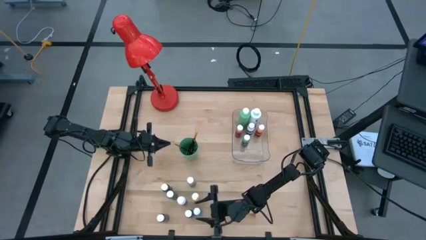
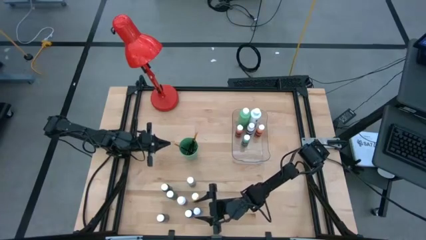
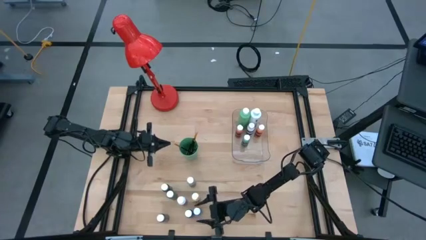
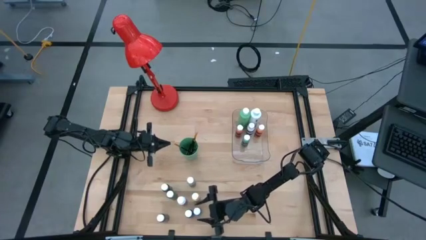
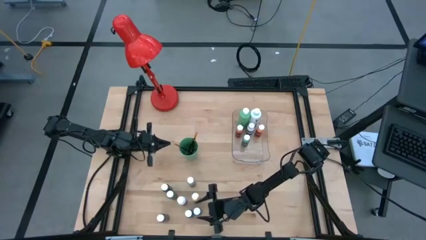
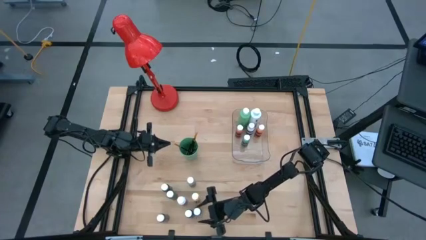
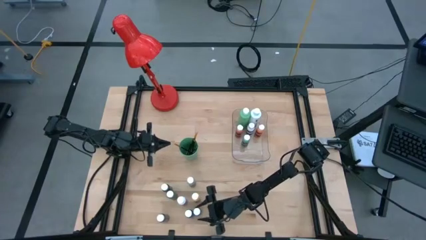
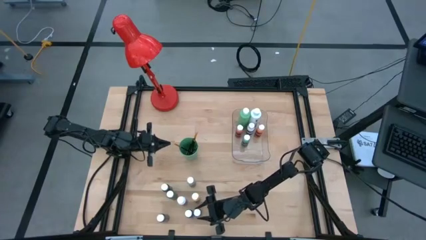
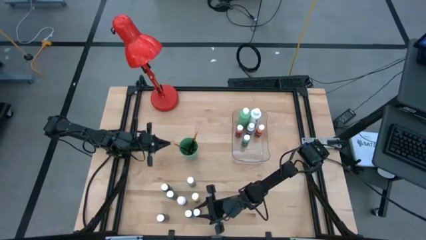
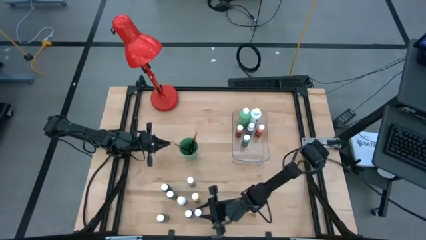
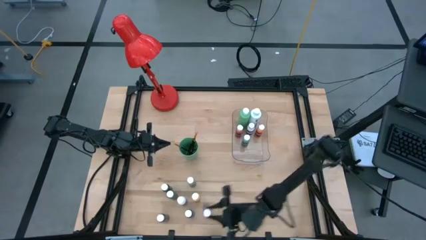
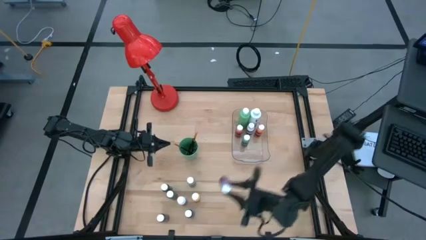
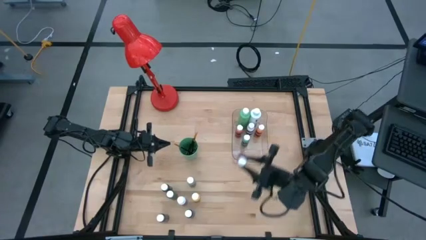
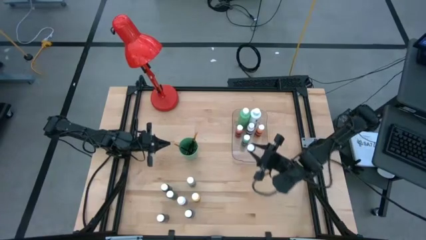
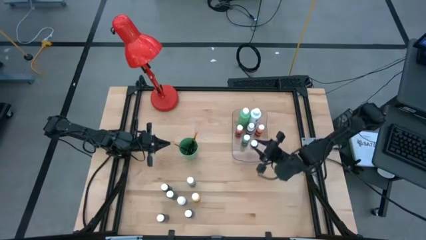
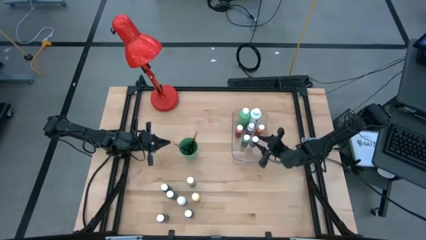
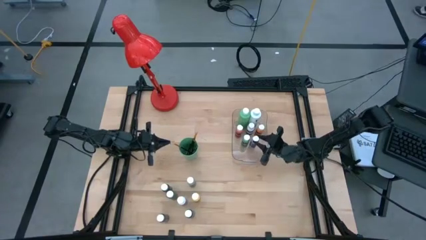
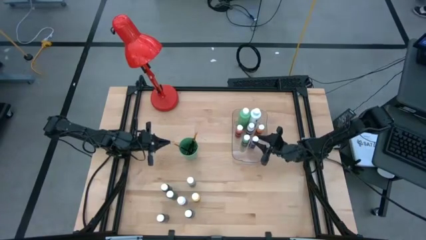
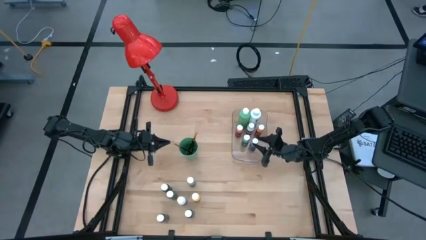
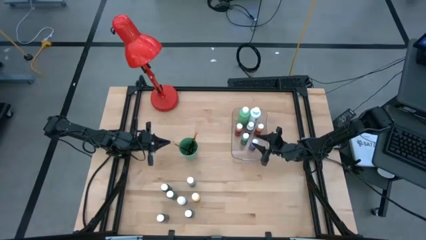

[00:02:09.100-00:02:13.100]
Task: Pick & Place Paint Supplies
Put the small purple paint bottle into the transparent bin

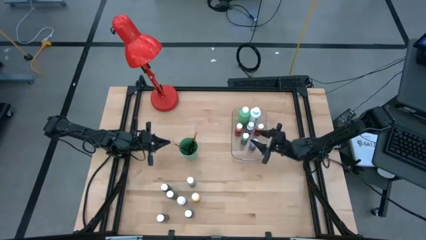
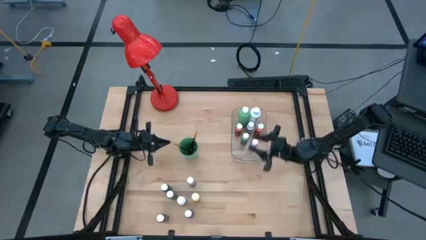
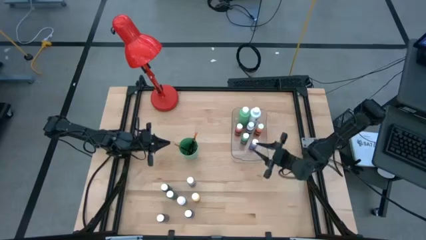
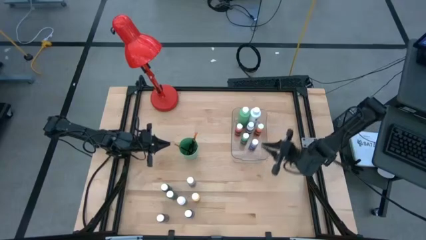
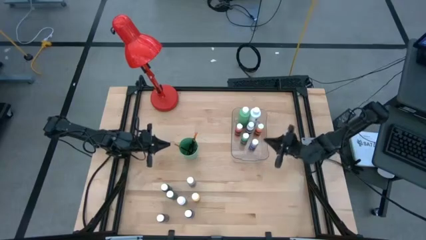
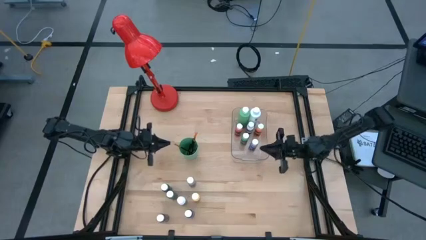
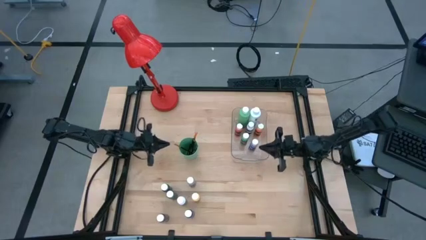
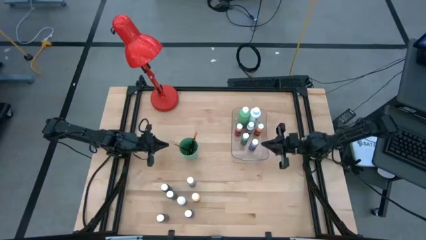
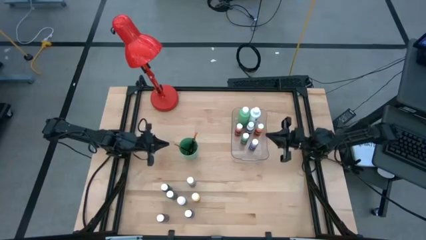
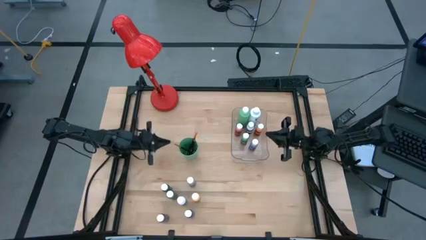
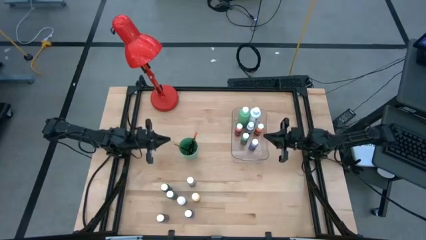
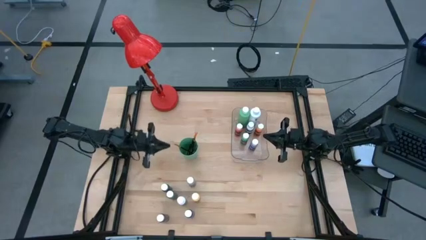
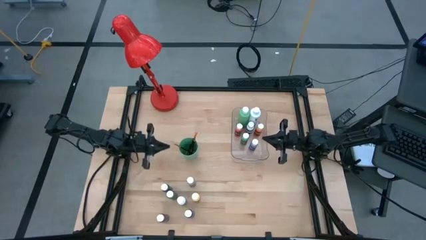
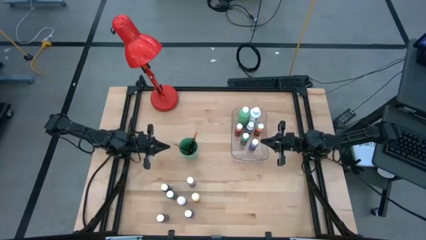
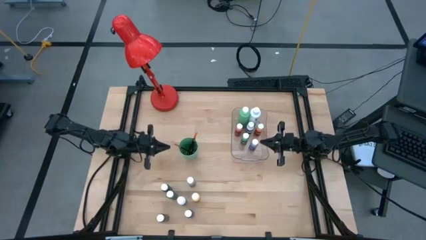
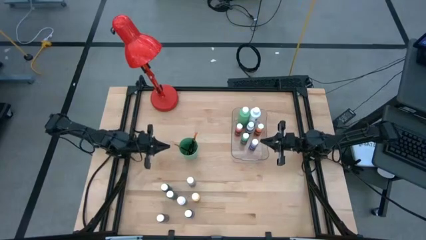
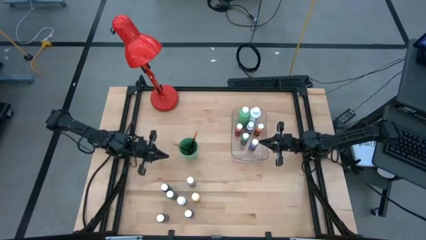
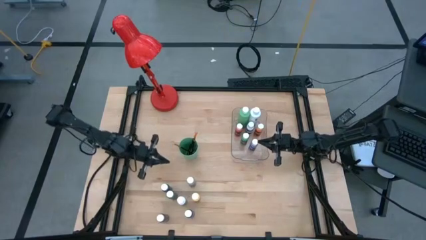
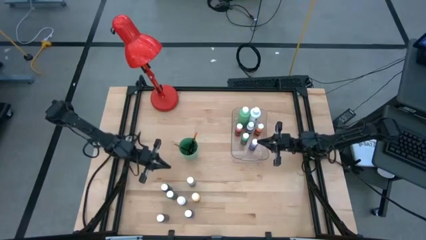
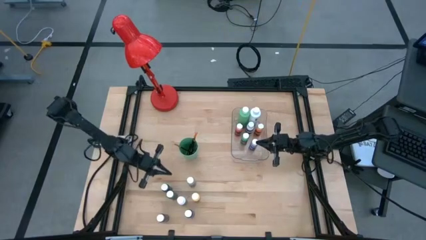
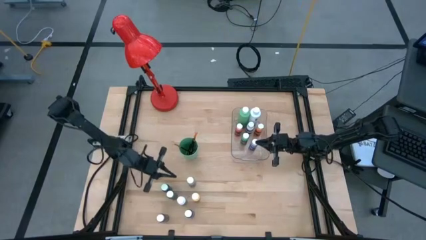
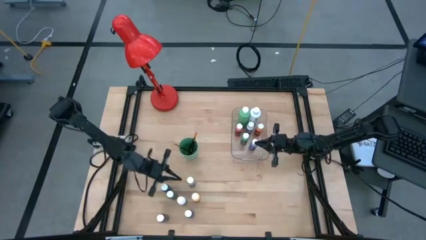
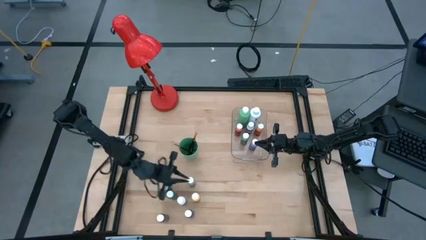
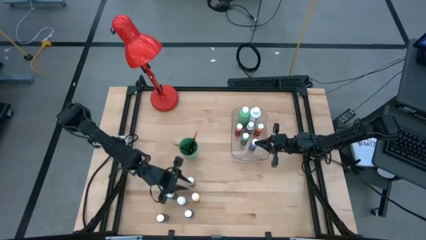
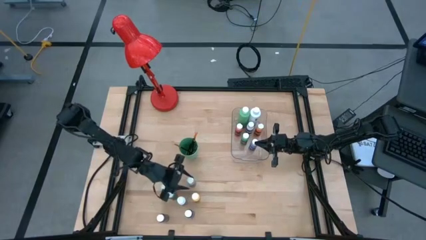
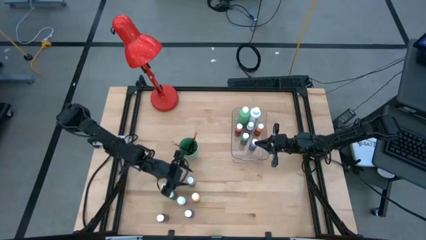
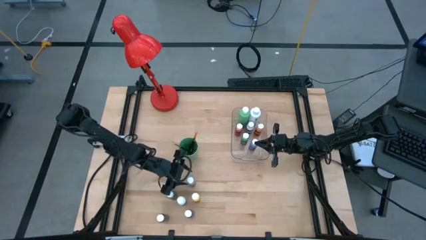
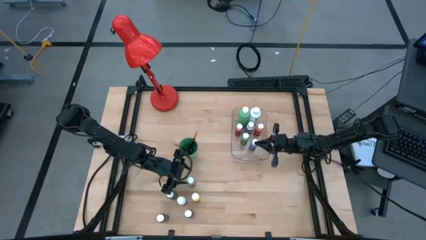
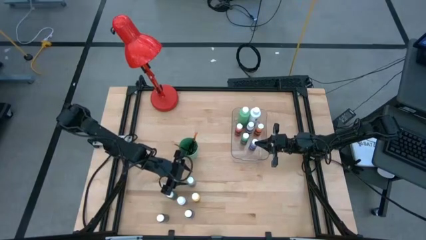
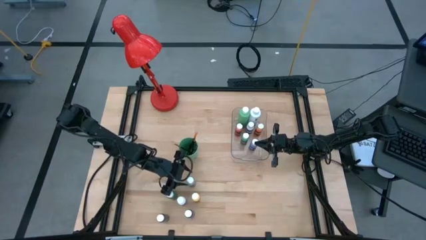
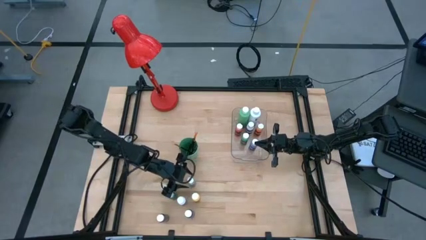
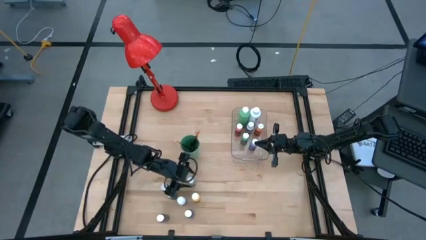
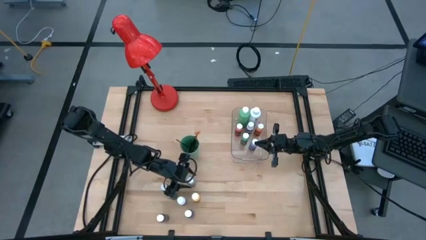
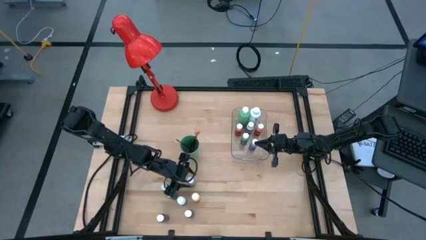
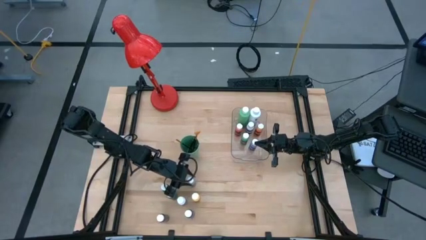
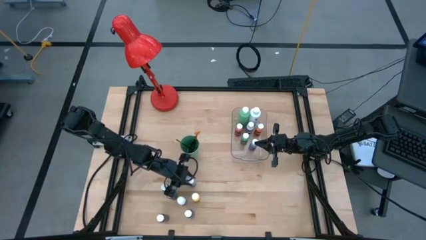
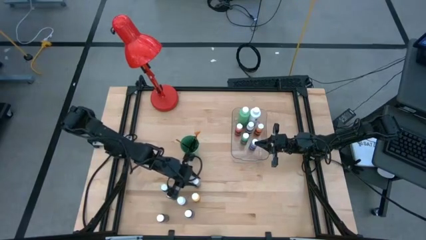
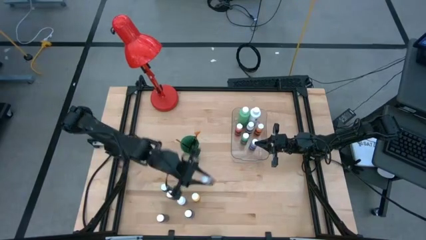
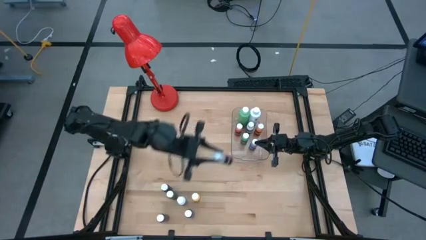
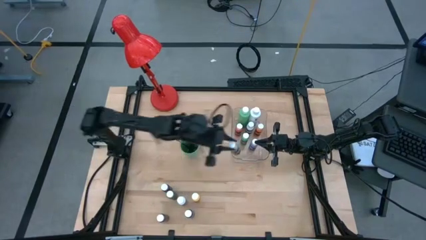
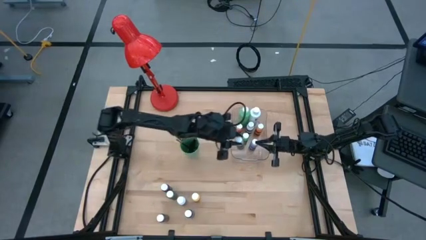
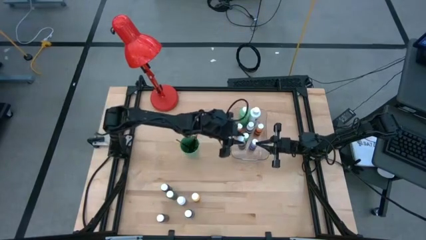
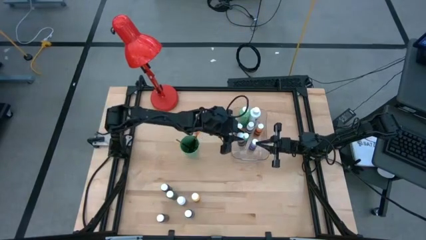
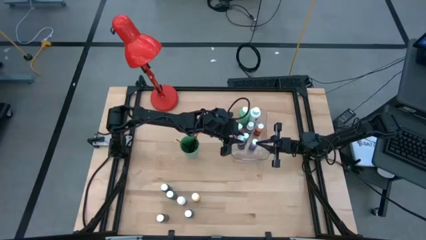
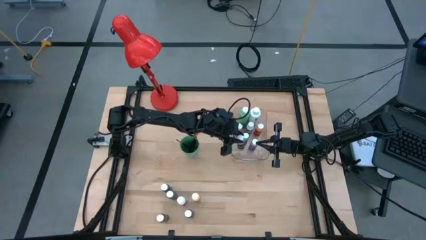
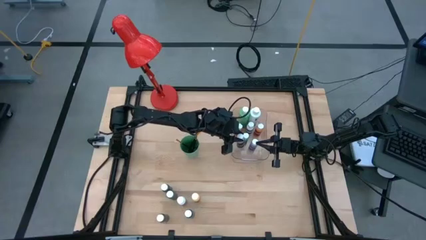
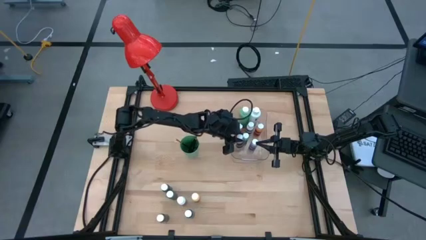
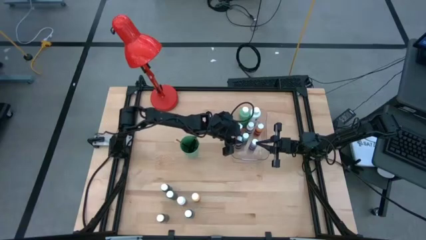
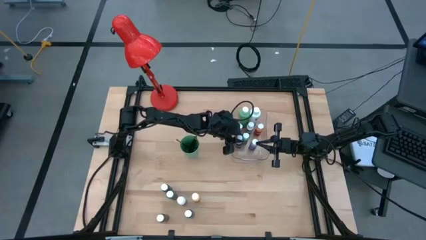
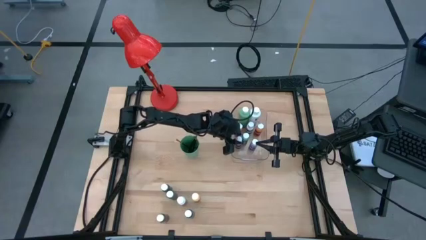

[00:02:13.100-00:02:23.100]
Put the small gray paint bottle into the transparent bin
